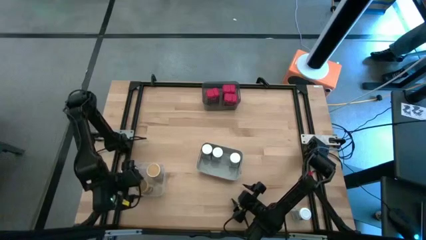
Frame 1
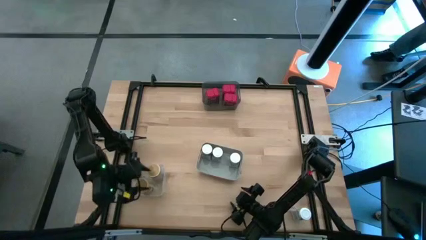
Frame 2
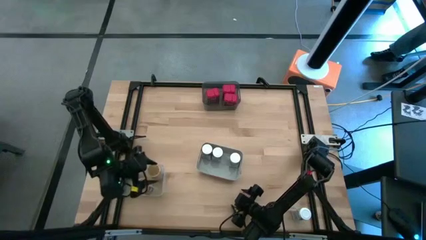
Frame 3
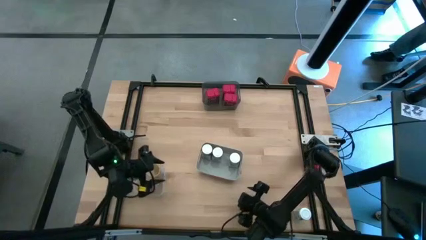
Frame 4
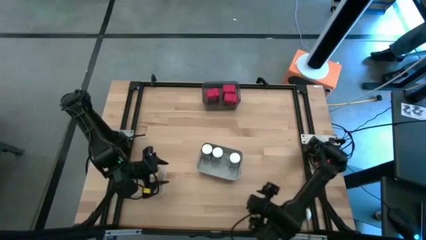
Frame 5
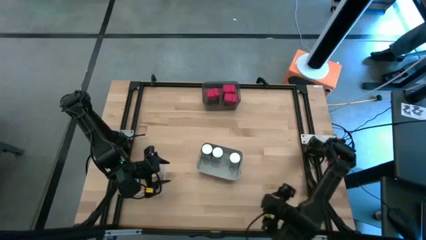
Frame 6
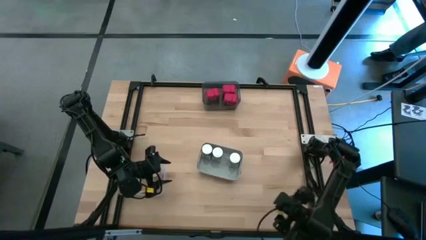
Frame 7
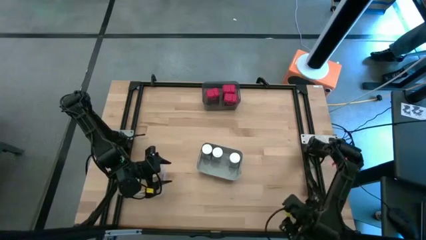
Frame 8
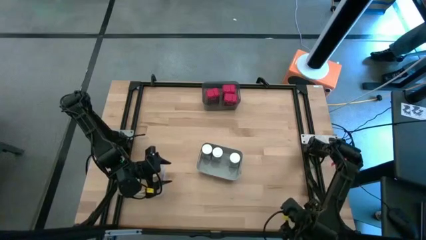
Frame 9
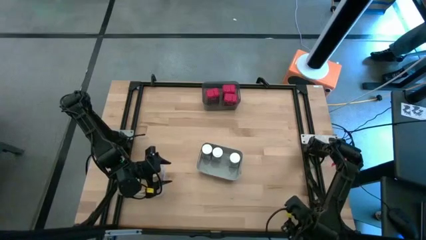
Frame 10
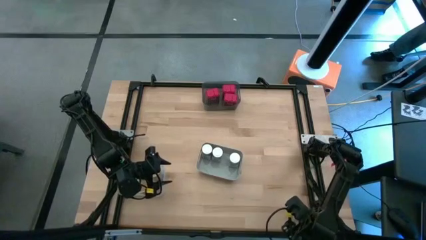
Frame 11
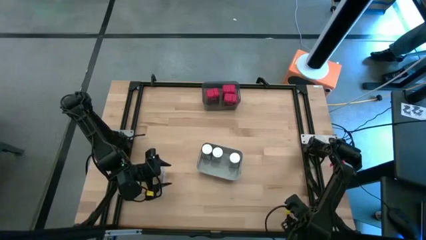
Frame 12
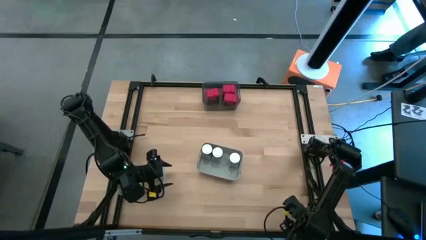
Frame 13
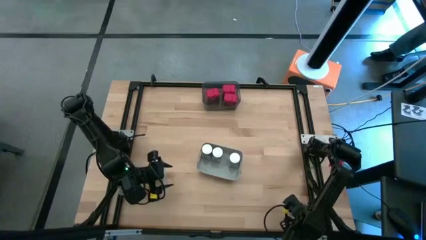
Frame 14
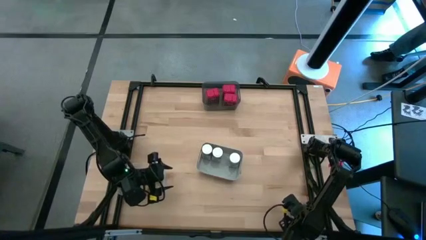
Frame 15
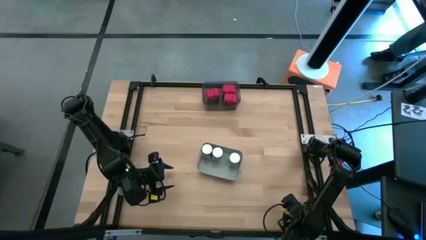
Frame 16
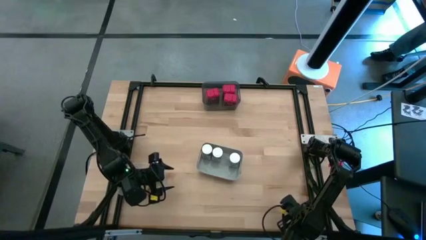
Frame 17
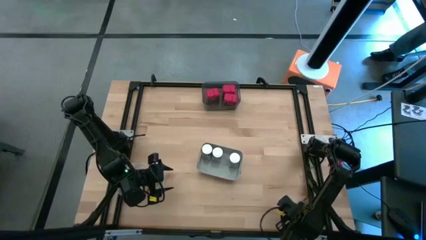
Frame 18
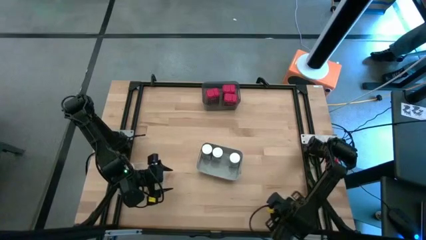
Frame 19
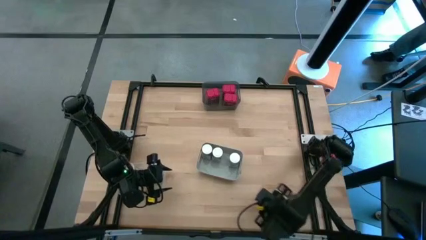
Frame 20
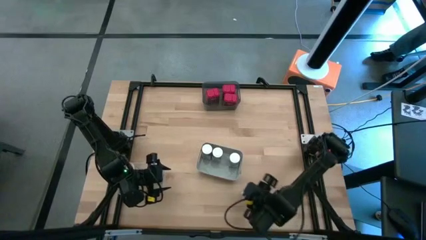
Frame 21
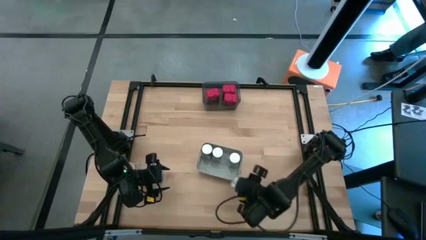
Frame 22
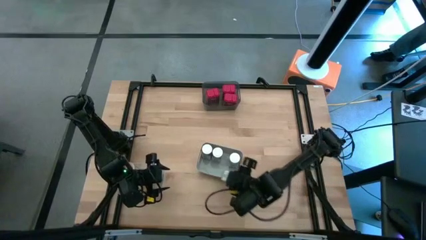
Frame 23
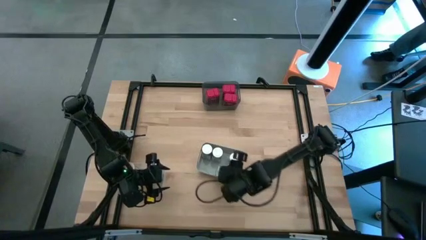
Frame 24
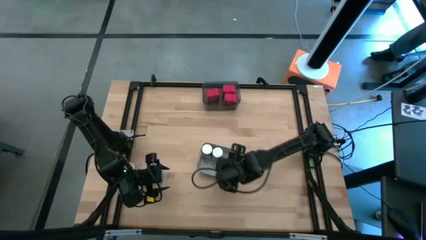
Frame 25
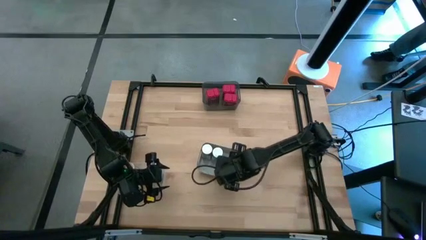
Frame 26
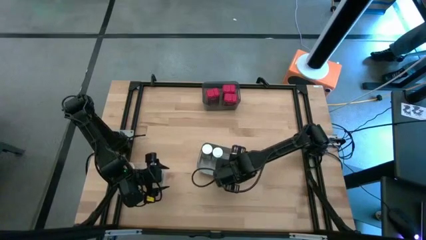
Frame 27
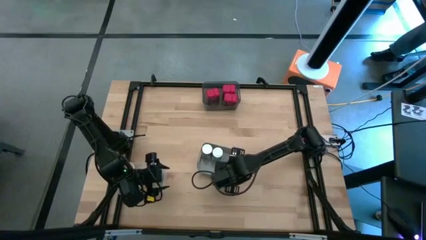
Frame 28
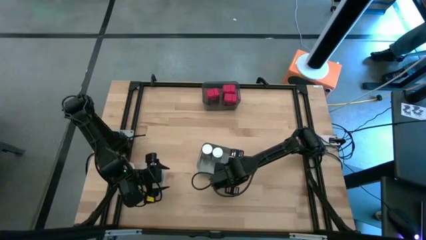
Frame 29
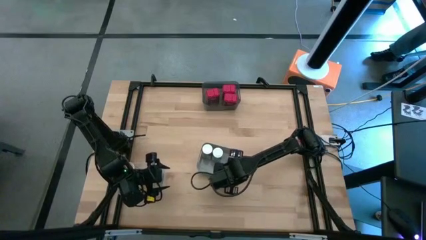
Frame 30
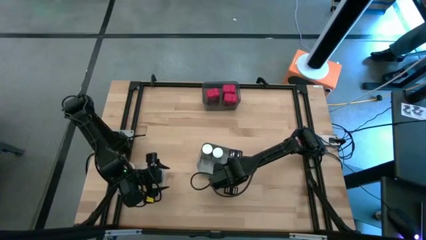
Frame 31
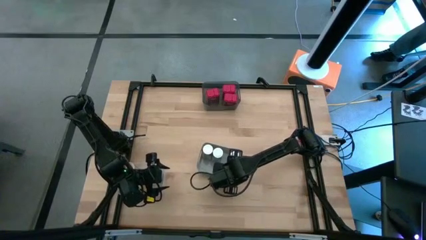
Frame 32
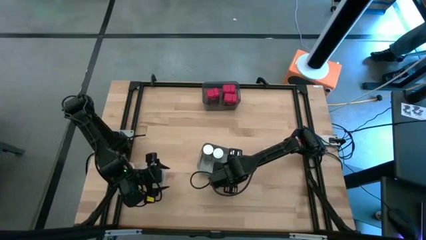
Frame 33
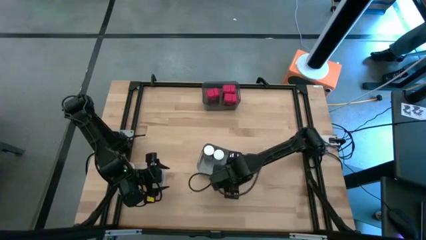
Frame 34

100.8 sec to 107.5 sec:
Task: Sort spices by type
Put the white seasoning bottle into the gray bin

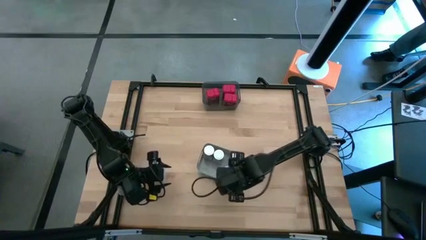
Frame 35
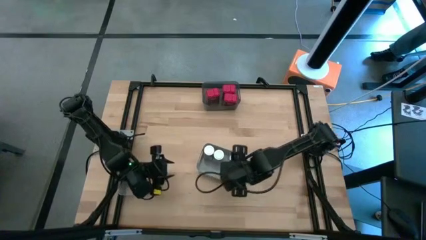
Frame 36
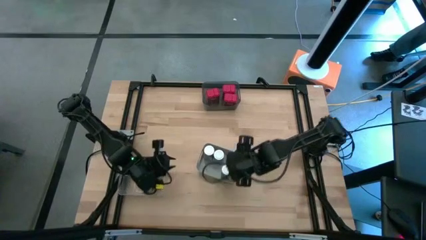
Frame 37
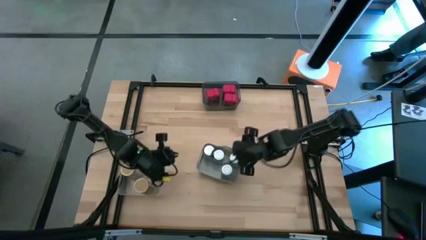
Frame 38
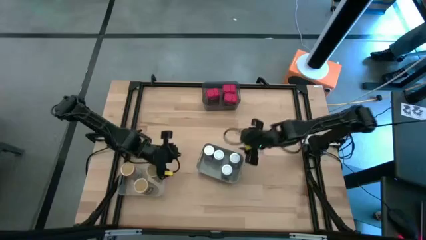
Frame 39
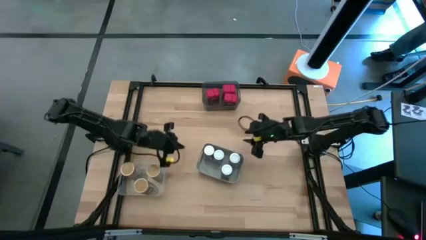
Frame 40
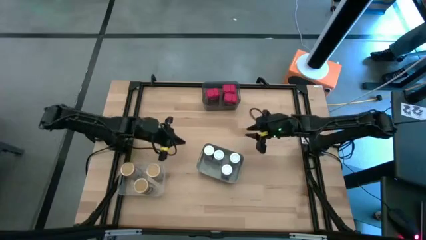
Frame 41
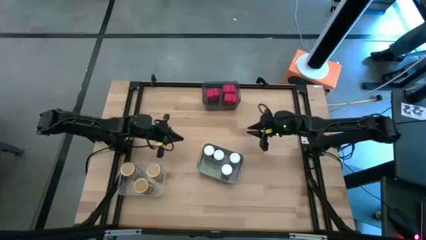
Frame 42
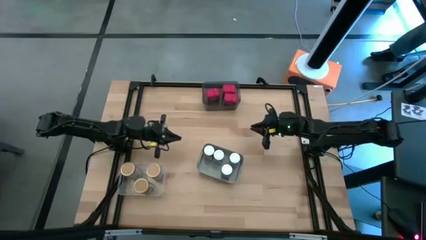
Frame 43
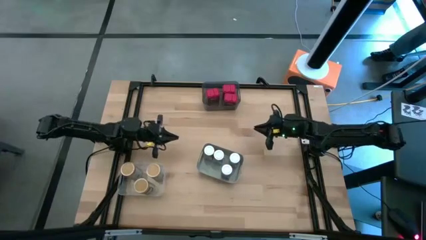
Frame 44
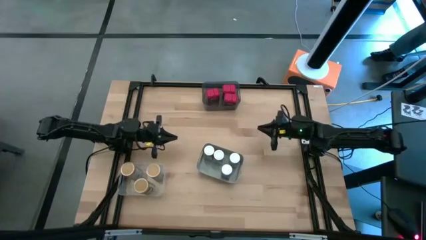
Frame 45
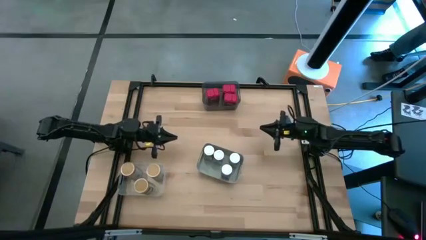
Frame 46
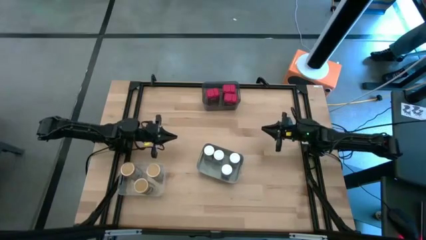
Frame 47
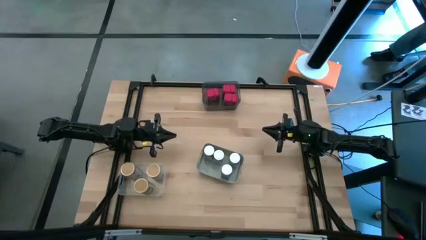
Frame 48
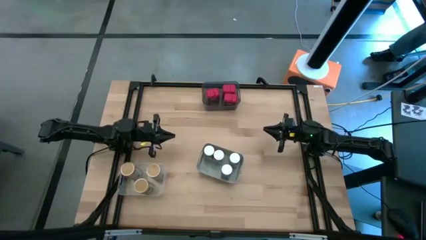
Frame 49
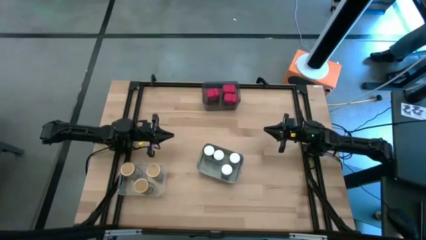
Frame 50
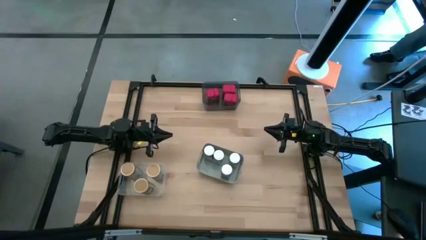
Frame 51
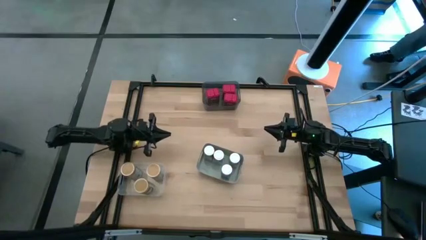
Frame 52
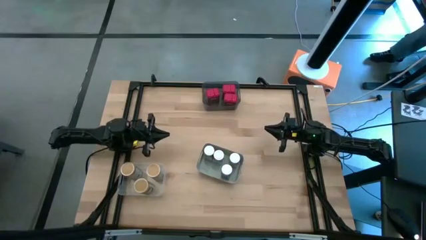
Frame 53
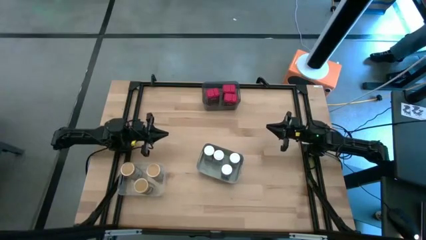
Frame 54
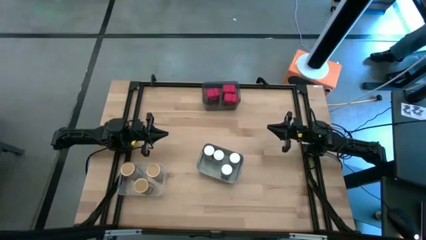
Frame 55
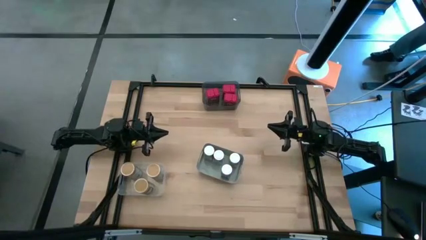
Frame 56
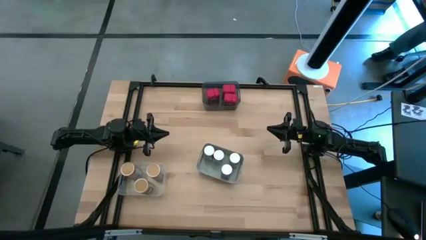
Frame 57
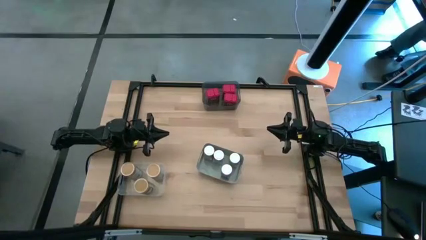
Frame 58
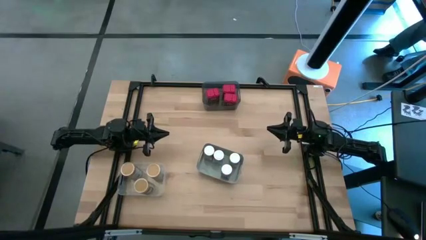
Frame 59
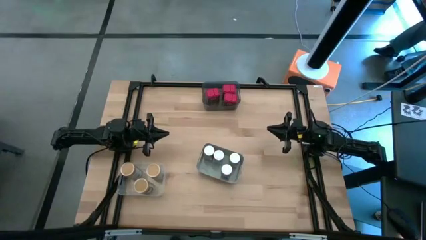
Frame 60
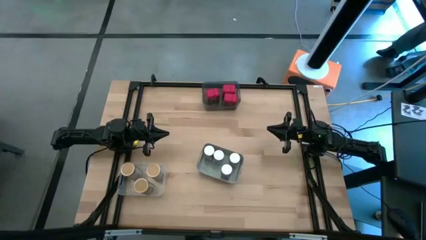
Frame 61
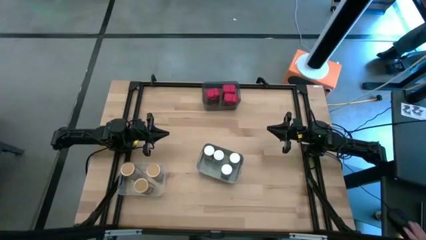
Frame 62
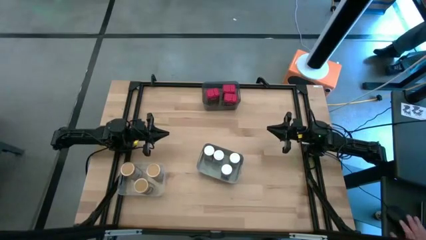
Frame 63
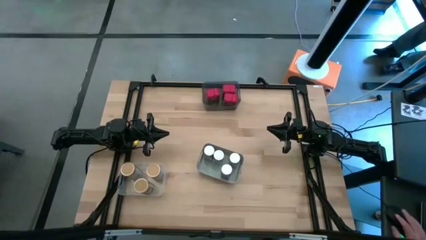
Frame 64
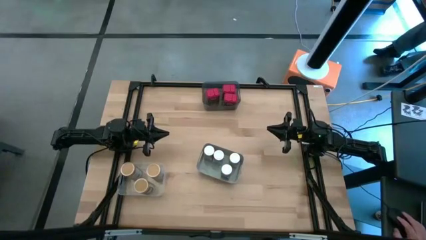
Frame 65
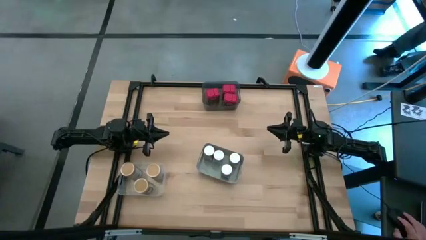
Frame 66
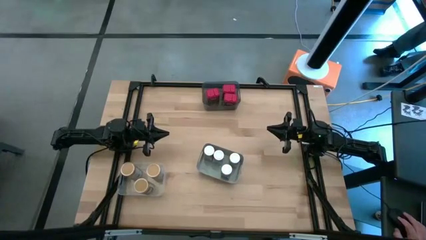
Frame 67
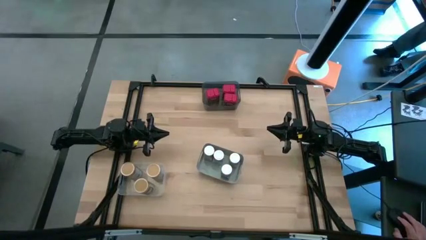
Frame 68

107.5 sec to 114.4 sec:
Return to Home Position
